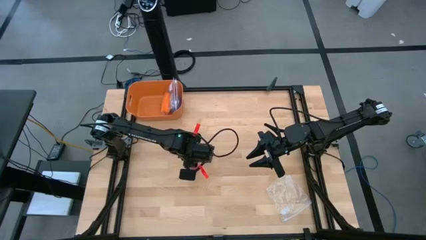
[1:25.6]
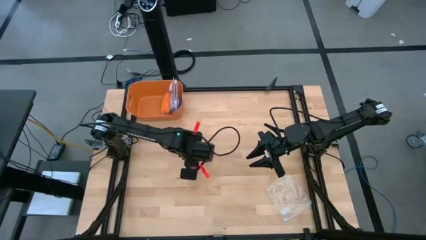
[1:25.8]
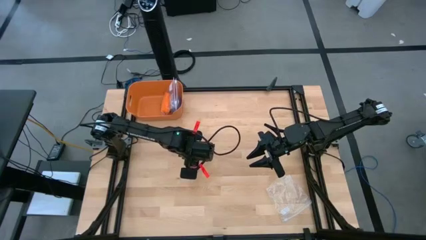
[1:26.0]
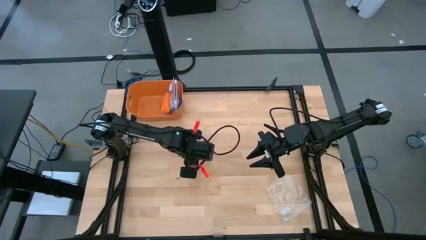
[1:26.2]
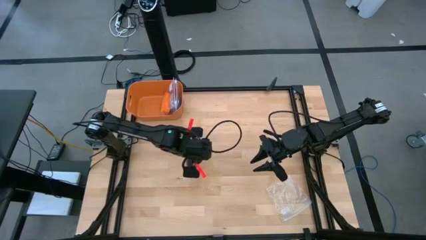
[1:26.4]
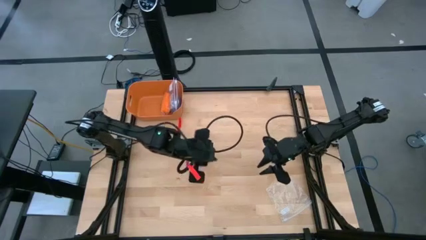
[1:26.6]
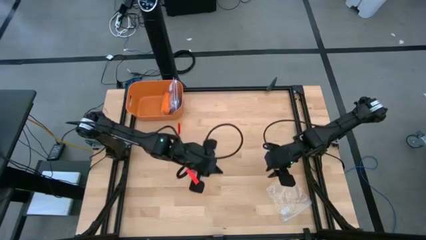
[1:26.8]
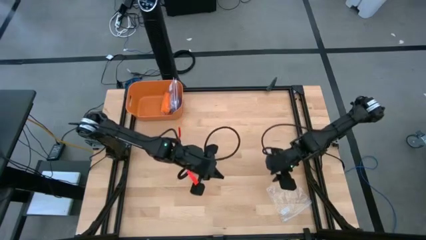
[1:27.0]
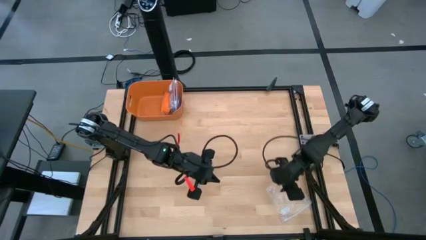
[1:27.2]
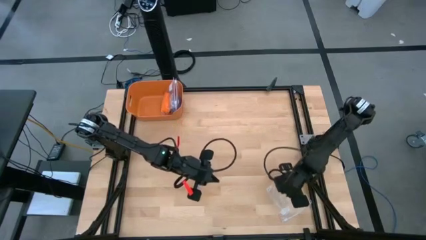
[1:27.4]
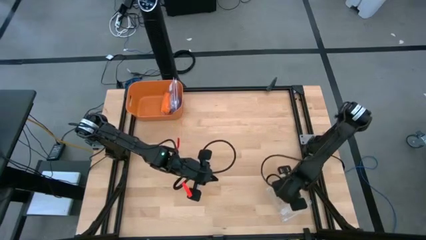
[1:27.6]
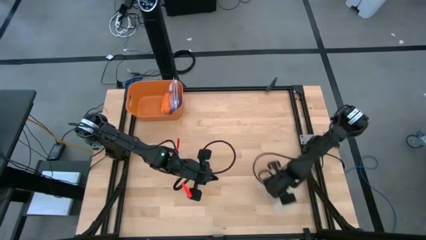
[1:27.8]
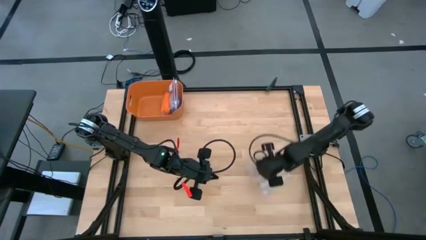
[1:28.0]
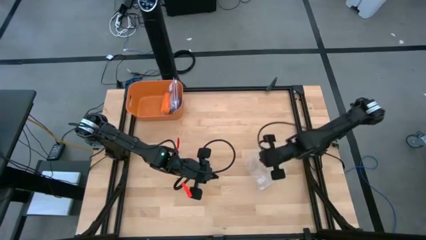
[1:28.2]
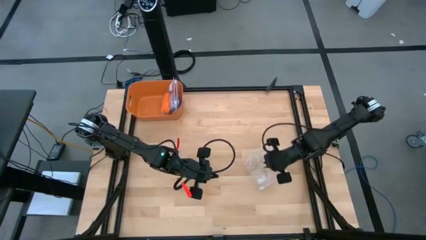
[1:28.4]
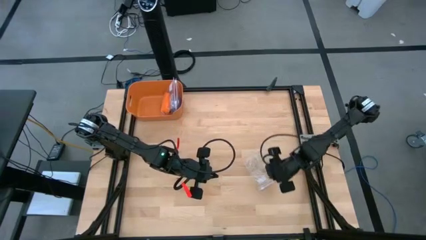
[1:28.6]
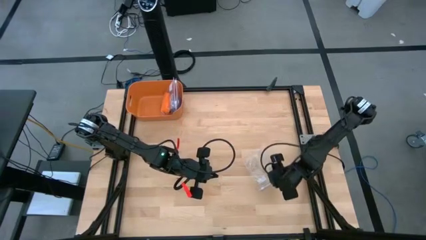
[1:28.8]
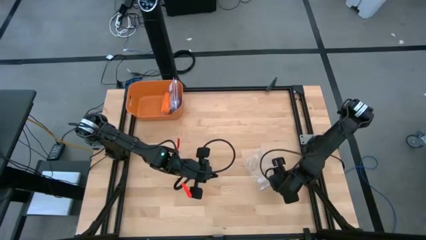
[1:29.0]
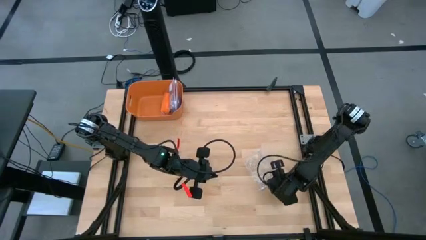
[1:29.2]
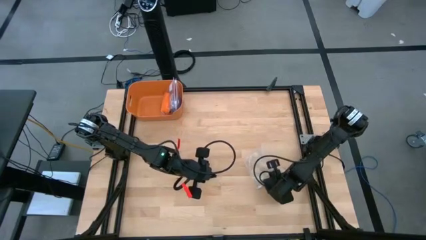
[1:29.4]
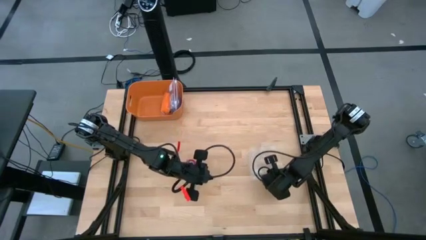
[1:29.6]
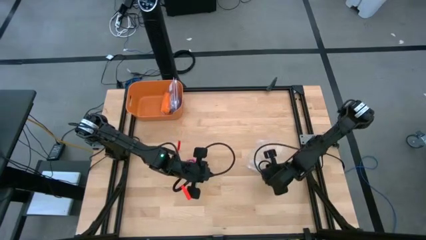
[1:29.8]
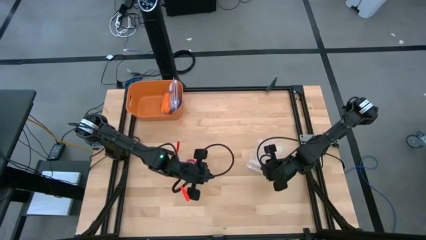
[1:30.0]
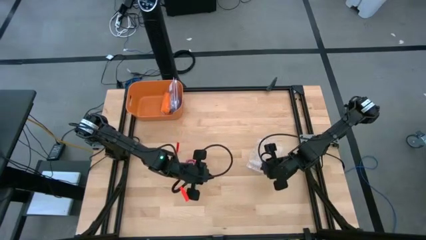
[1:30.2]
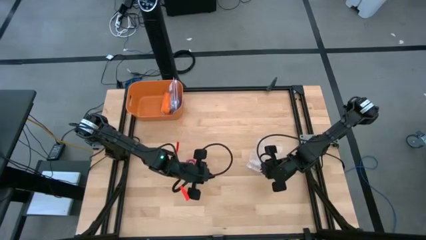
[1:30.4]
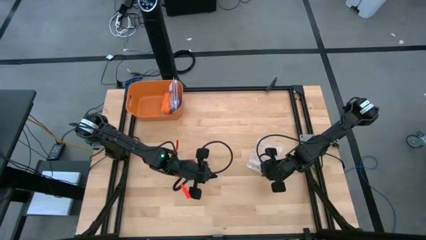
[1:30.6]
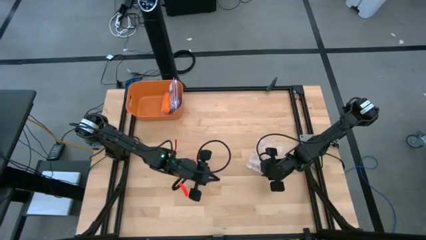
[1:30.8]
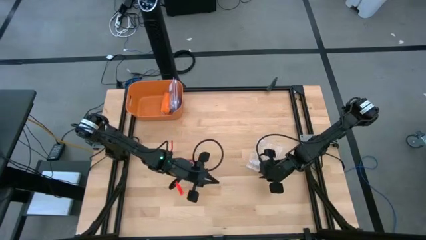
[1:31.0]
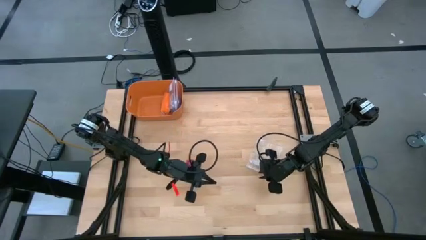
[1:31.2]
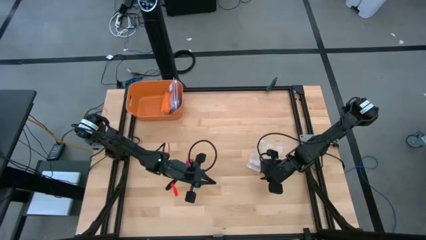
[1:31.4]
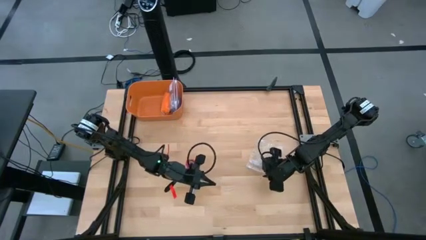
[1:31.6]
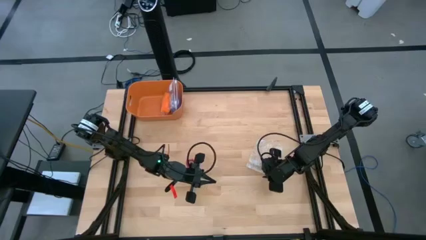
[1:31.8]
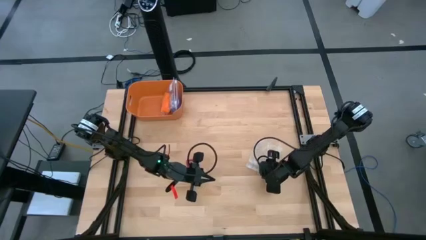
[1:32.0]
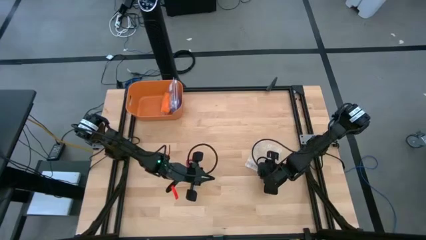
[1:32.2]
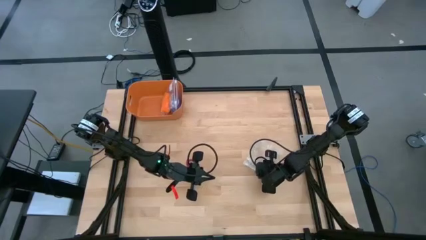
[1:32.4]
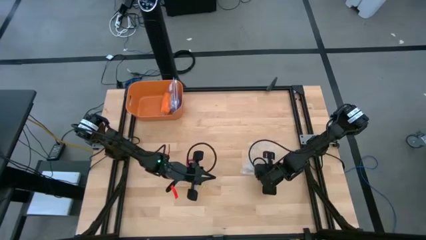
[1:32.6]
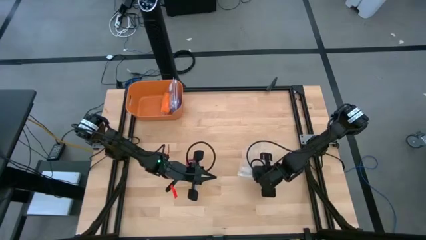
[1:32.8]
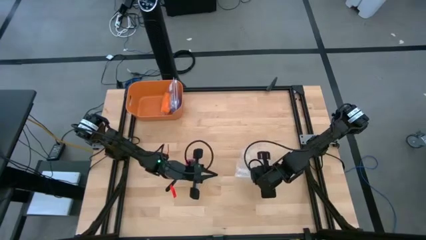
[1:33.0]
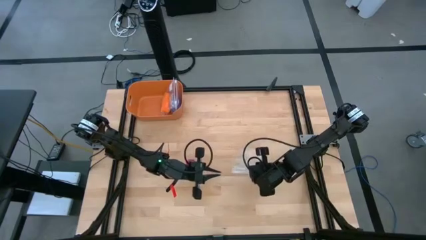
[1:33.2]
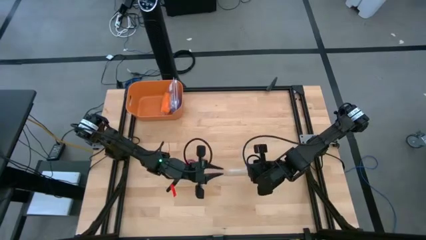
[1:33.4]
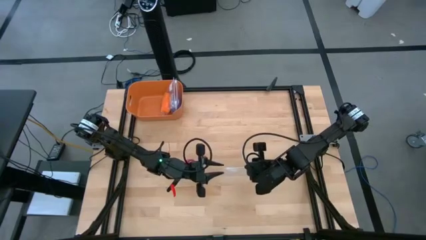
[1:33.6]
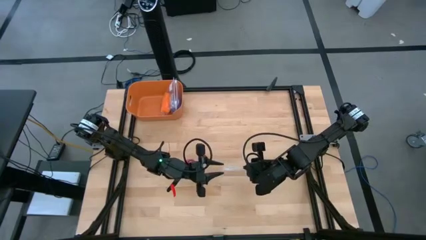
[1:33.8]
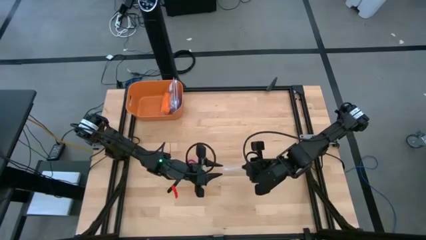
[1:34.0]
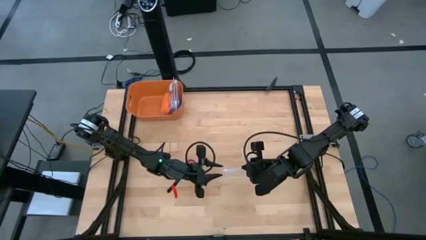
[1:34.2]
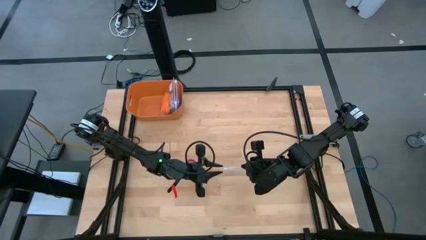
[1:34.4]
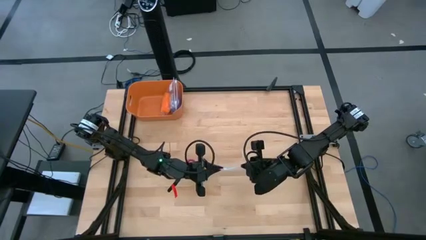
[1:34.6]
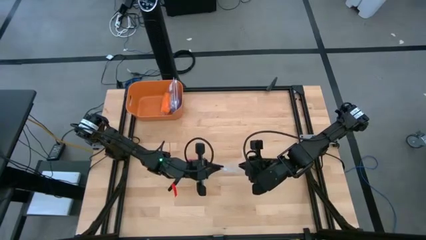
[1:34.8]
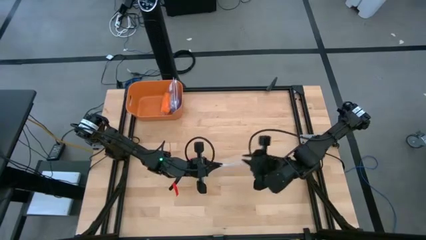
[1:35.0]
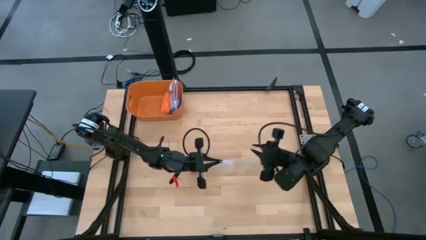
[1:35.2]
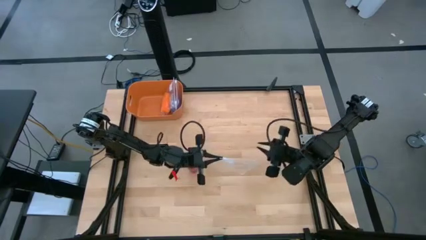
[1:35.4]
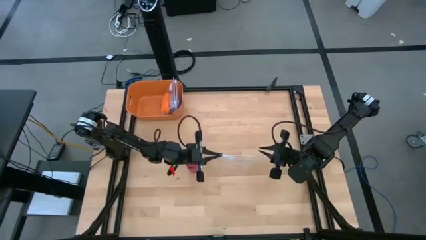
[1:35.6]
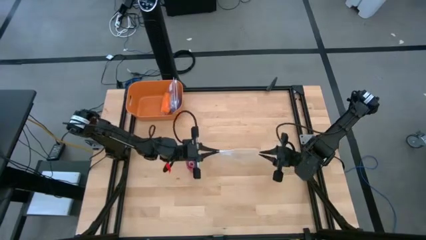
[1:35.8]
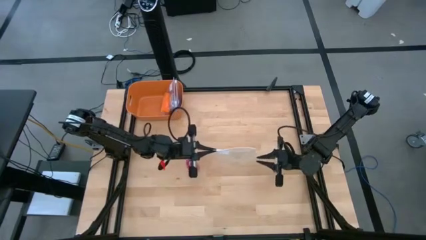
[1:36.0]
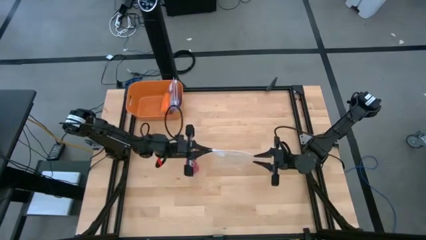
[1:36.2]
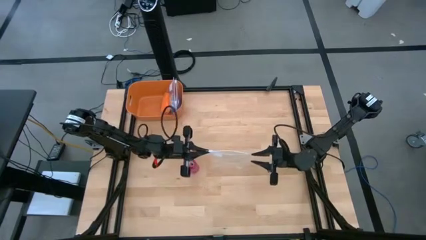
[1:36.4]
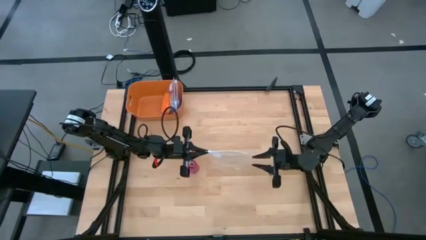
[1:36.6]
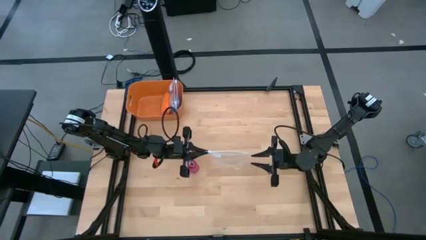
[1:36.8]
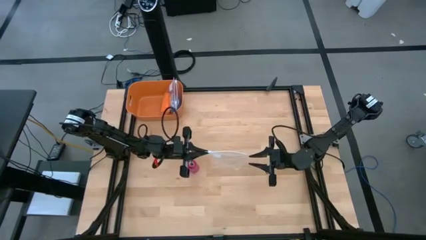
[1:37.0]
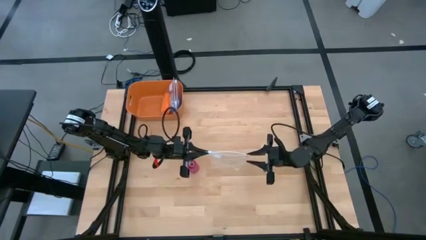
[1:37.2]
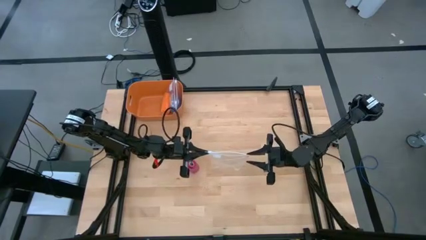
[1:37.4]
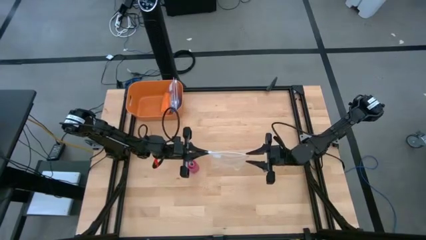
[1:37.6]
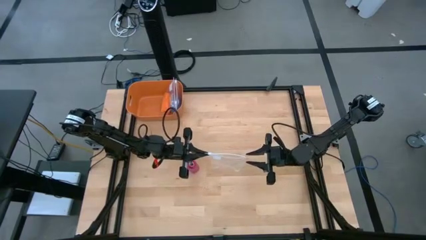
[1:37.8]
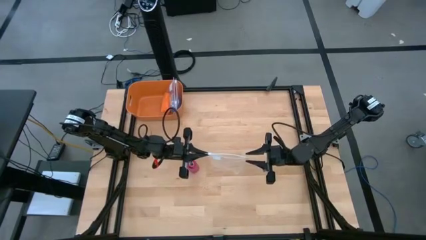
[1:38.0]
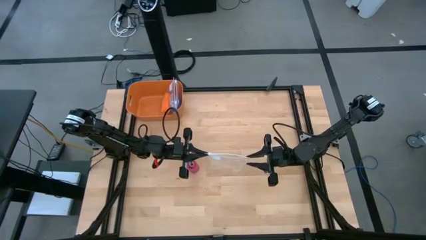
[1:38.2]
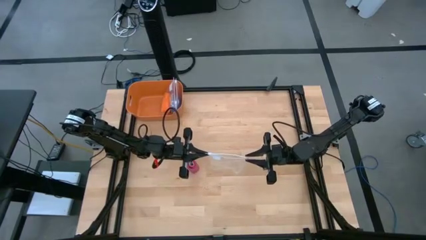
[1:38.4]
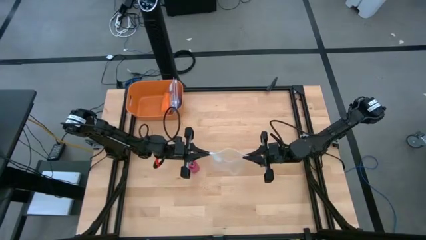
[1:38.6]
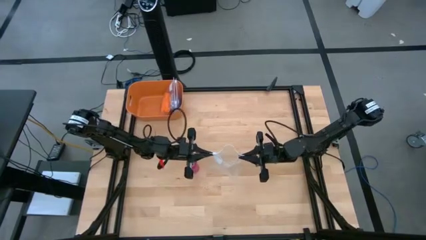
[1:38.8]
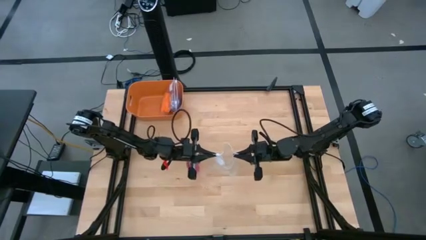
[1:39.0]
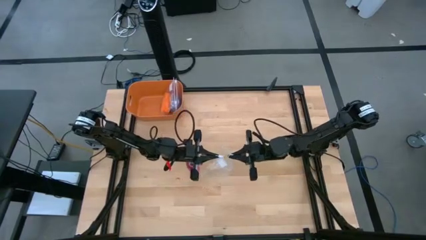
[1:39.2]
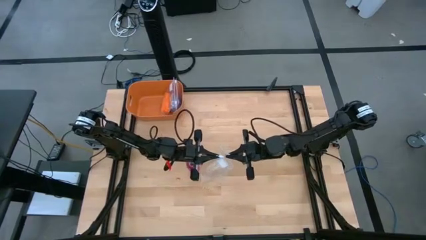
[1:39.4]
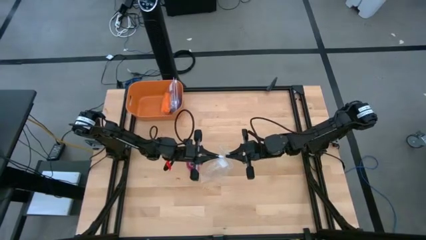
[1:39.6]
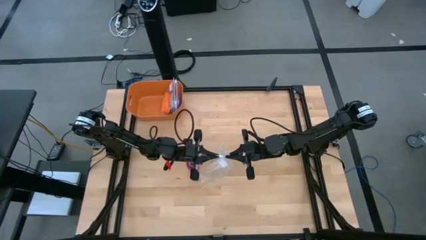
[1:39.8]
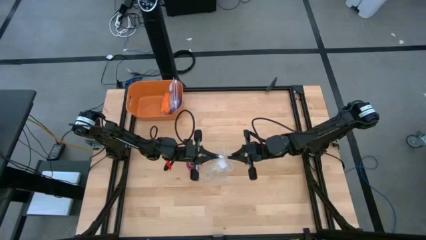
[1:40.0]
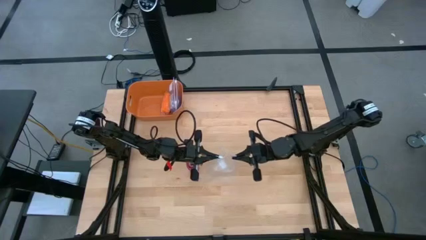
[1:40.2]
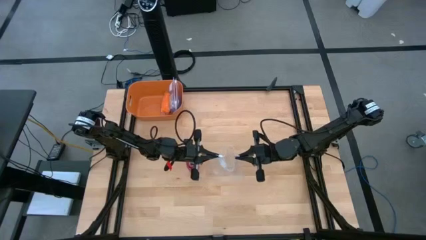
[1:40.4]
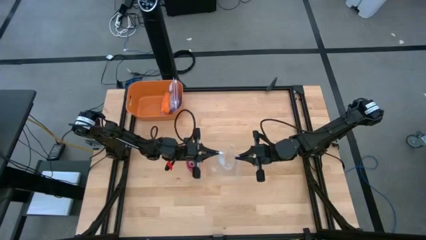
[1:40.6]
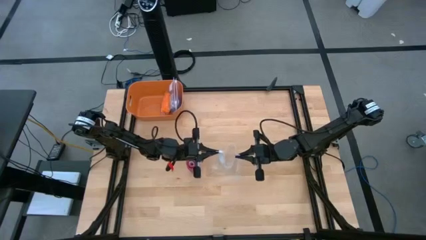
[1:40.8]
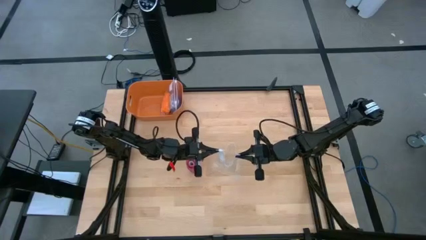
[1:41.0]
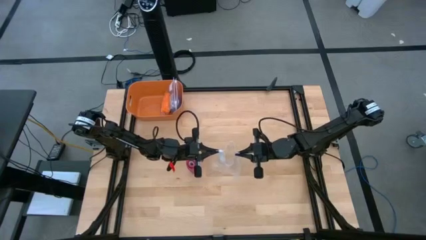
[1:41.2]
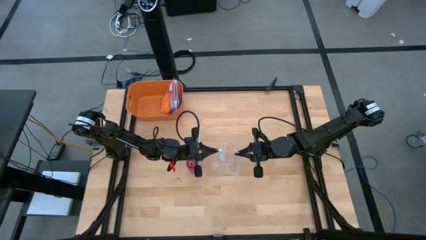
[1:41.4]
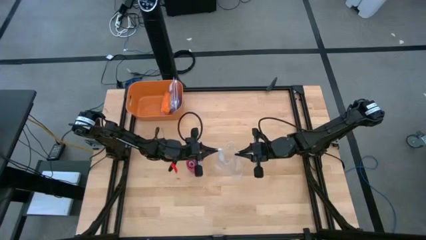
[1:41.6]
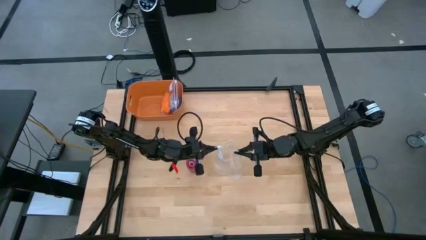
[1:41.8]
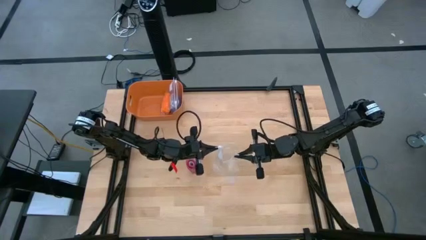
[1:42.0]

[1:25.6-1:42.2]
Task: Roll bandage
Put the pink bandage into the transparent zip bag
